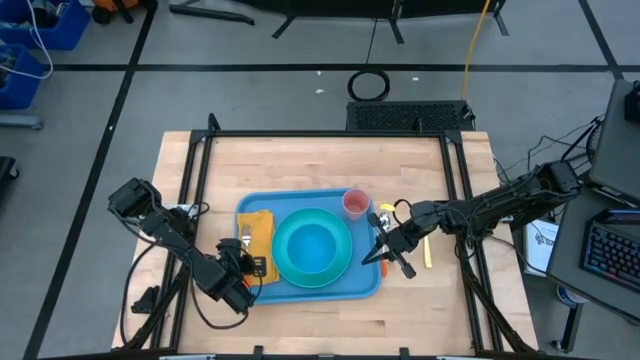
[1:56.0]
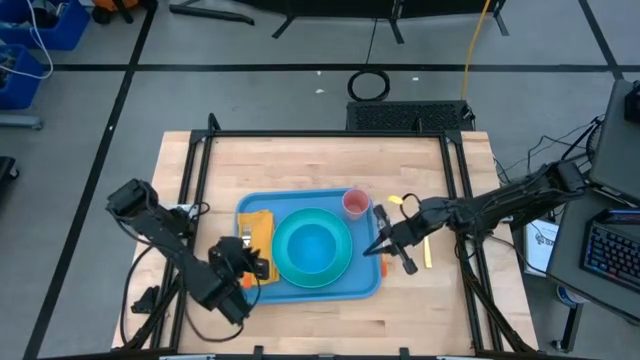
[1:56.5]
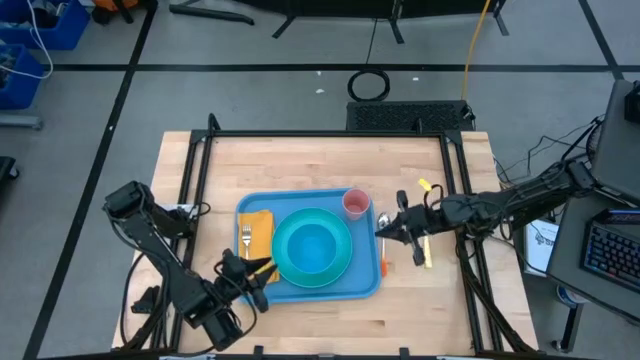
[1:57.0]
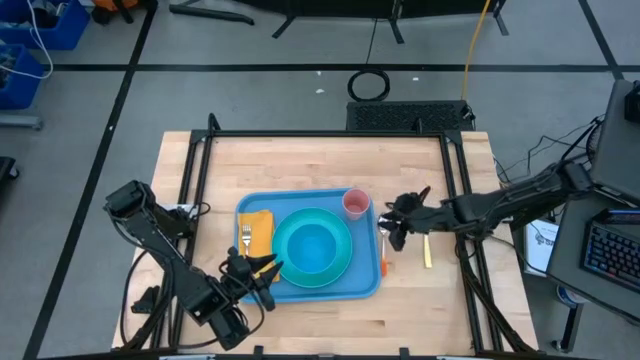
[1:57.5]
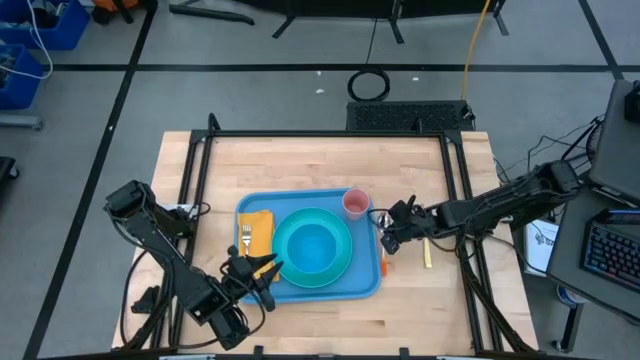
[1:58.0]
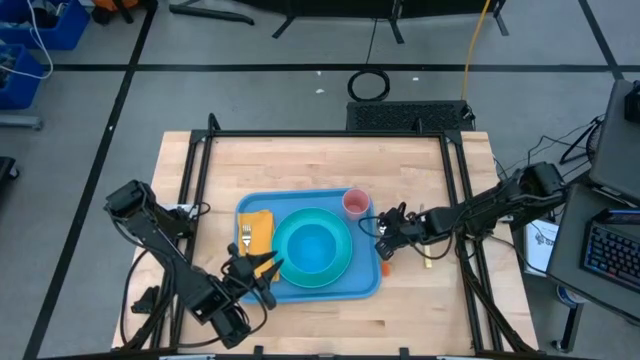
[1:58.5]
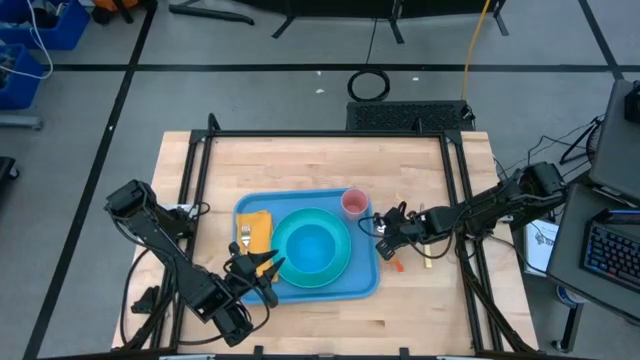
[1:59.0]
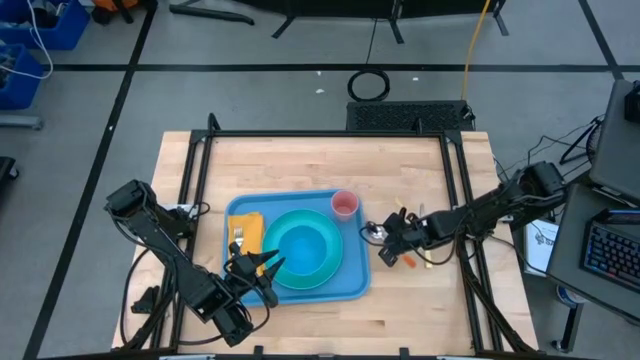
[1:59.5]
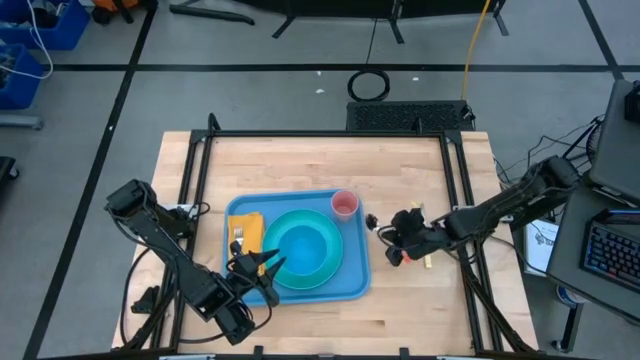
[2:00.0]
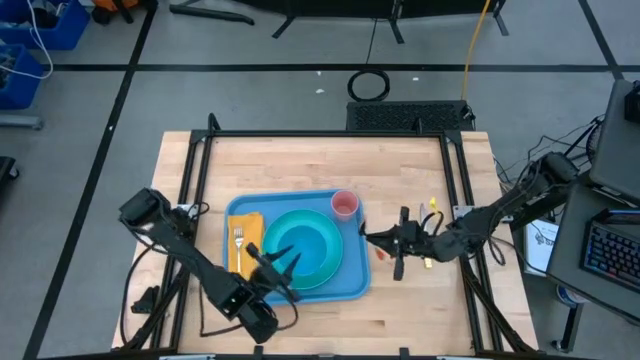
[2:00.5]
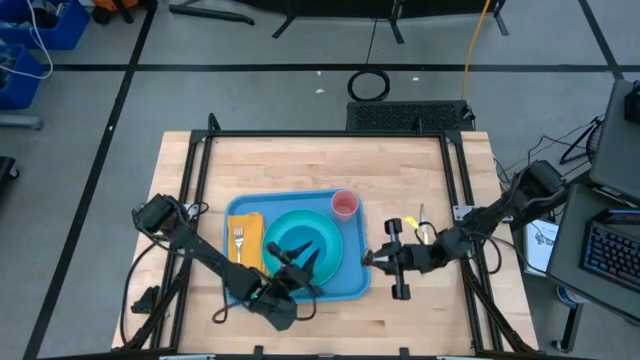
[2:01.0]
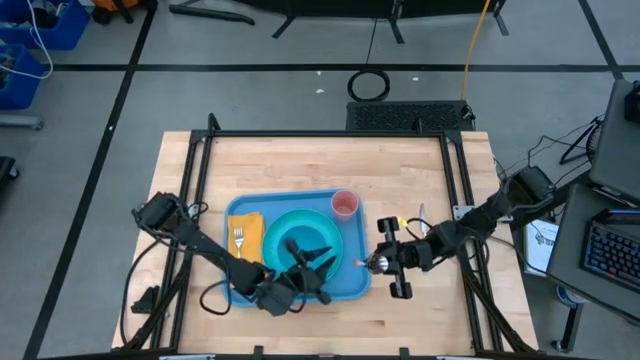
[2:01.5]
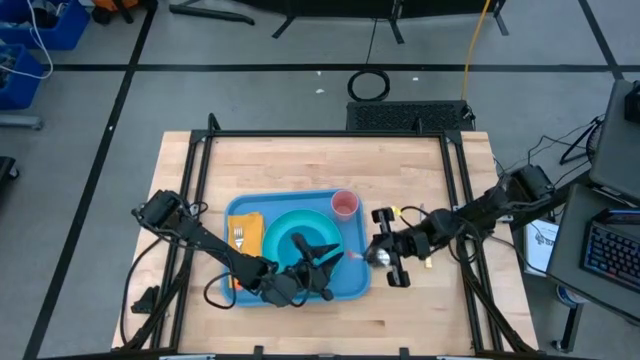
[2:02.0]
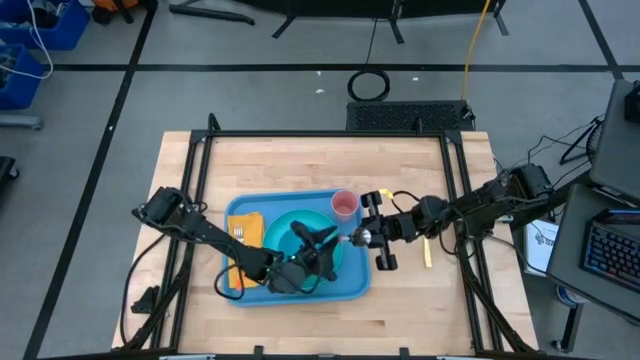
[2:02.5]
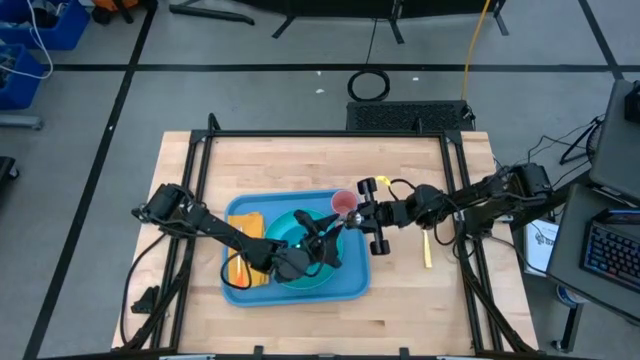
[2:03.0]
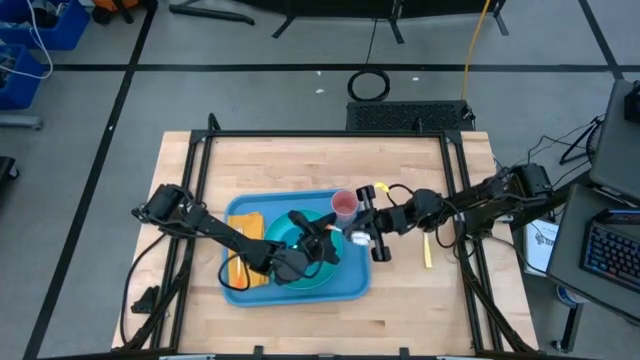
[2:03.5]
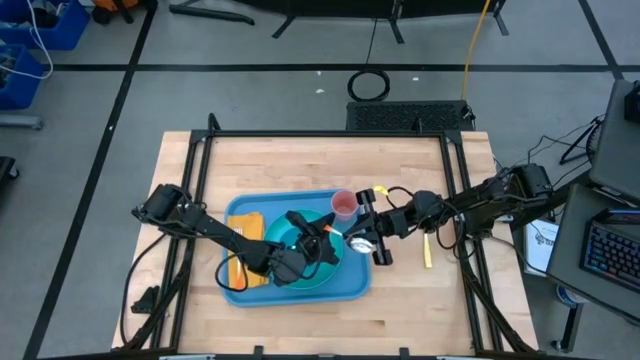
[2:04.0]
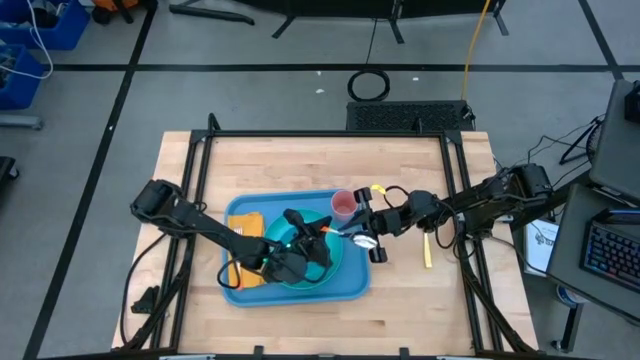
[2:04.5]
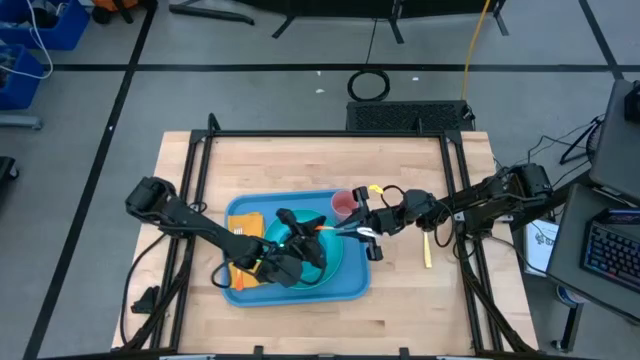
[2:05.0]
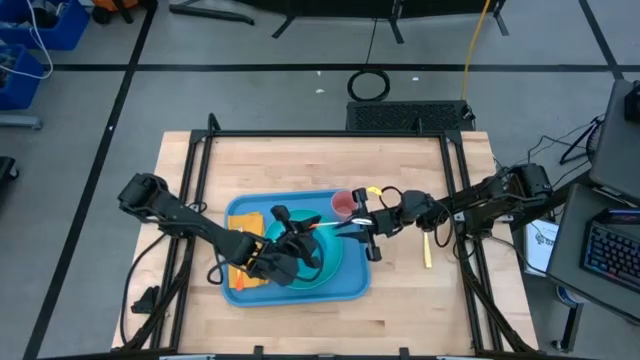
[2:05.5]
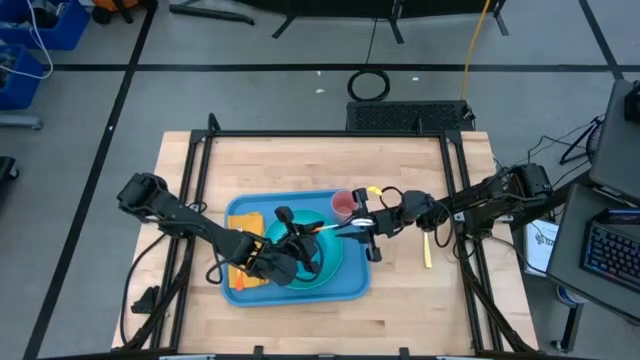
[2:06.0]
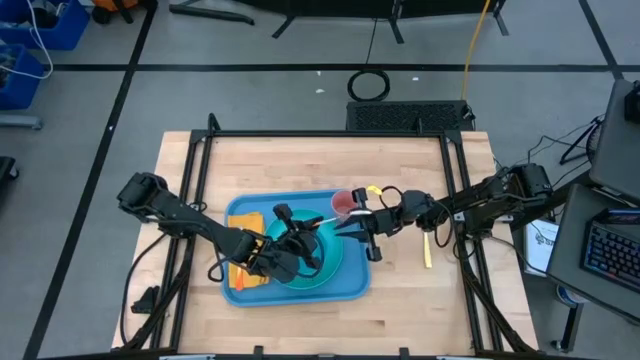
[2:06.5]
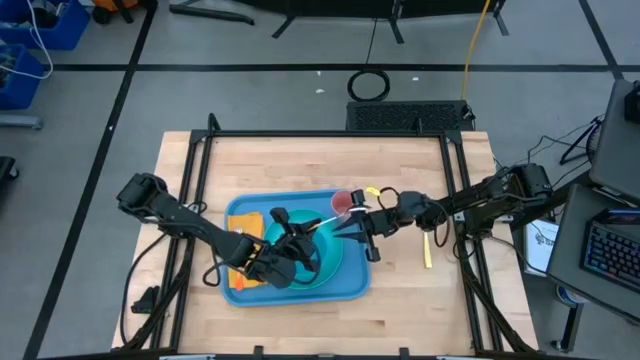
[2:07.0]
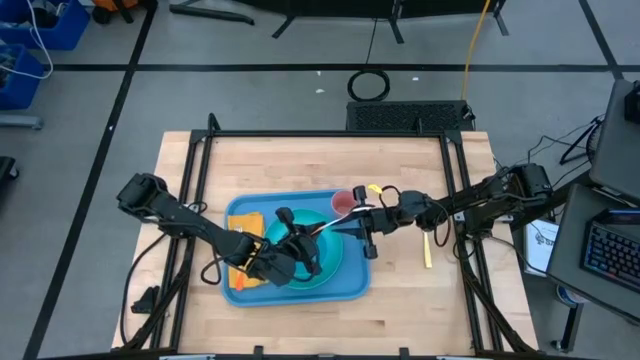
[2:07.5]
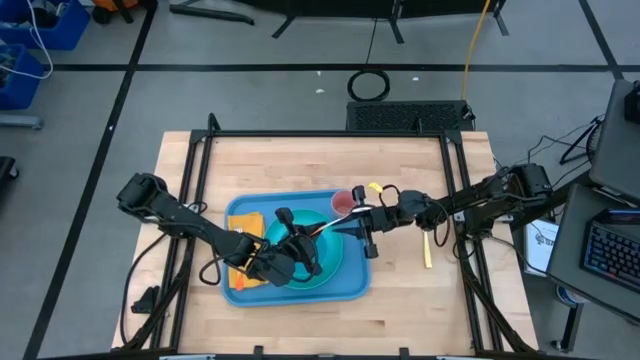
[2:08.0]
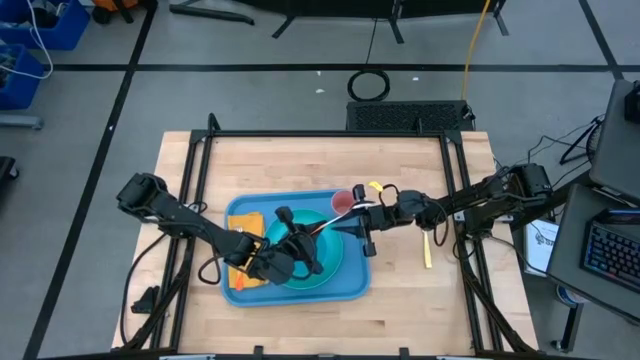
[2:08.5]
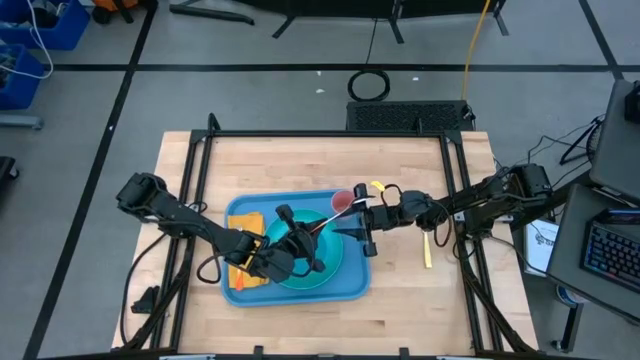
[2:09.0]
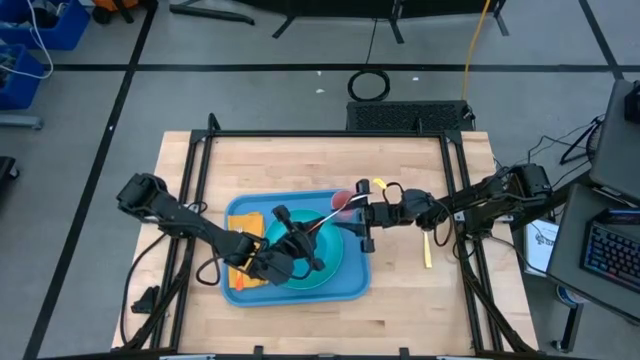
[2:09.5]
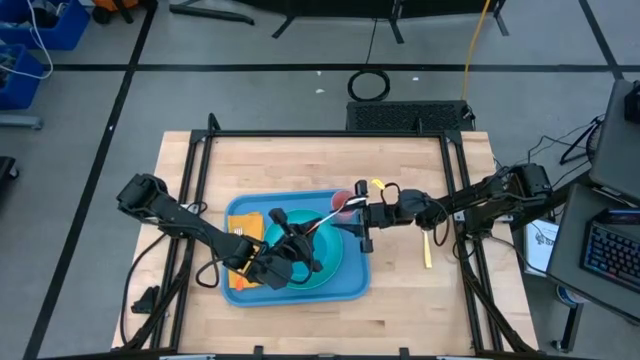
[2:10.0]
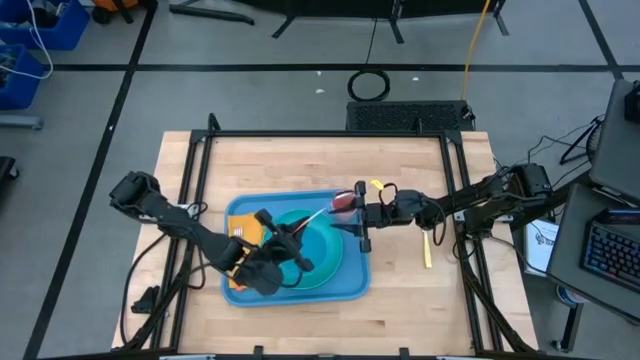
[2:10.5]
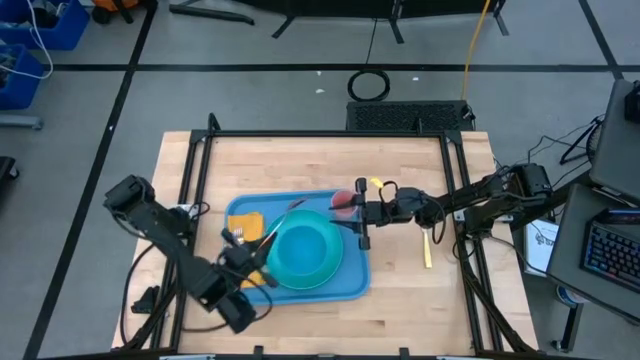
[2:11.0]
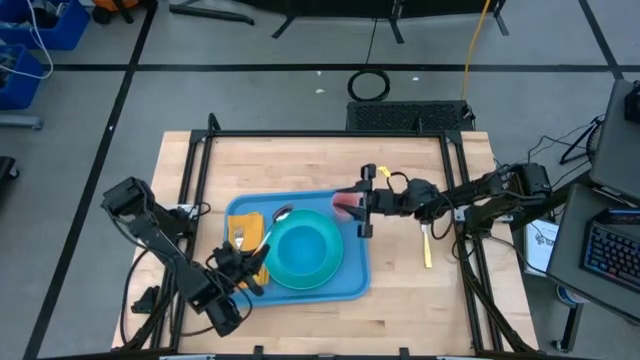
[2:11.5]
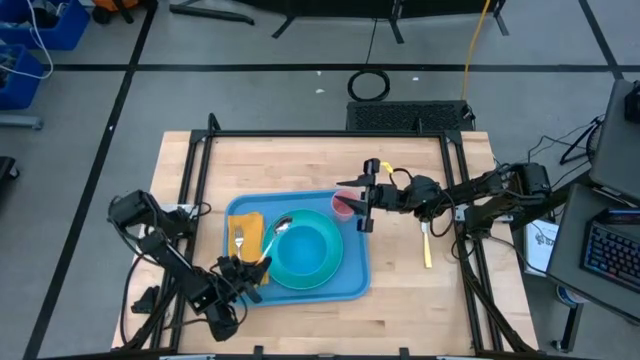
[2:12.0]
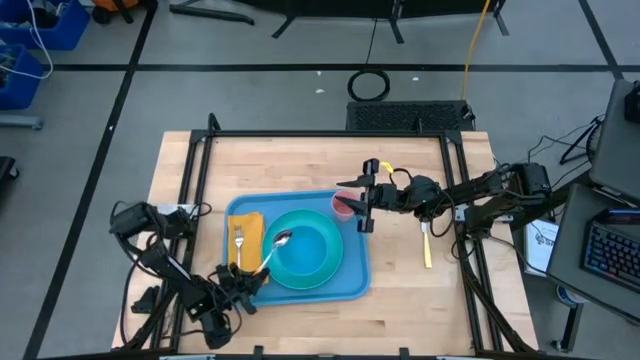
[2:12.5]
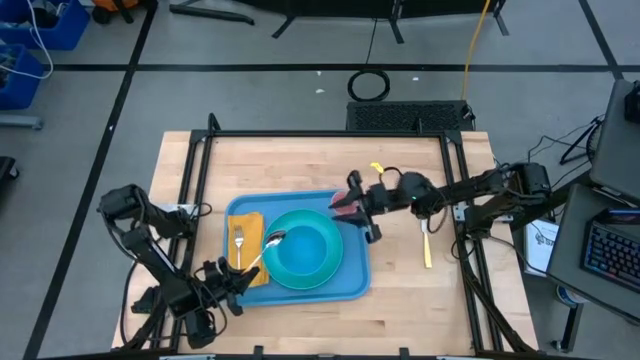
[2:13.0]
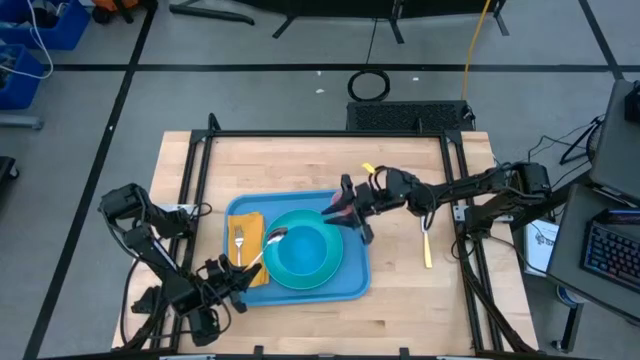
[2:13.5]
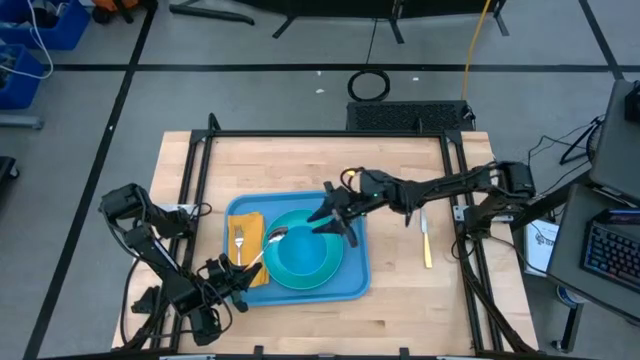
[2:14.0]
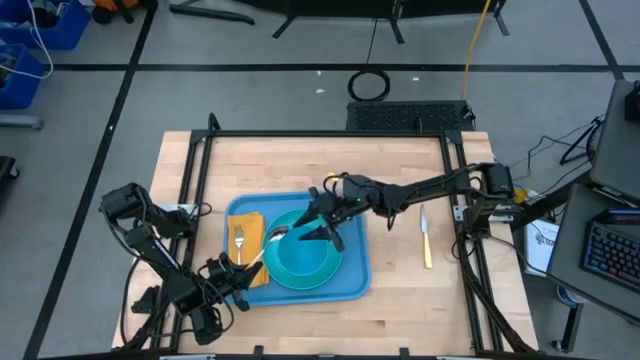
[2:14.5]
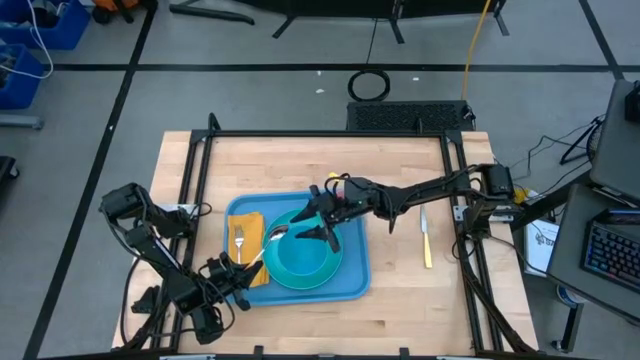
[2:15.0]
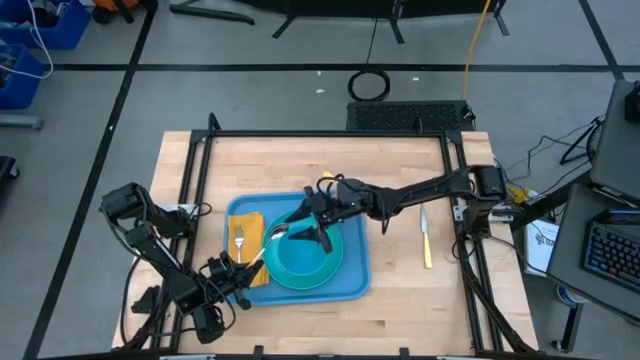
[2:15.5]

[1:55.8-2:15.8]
Task: Set up tray
Put the orange spoon on the blue serving tray to the right of the orange fork
